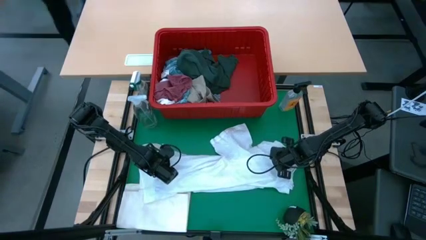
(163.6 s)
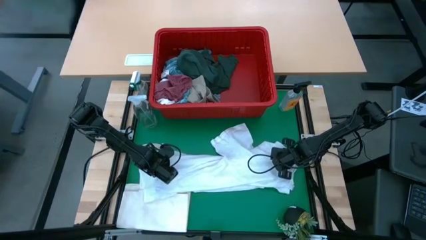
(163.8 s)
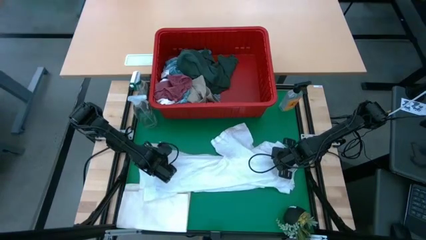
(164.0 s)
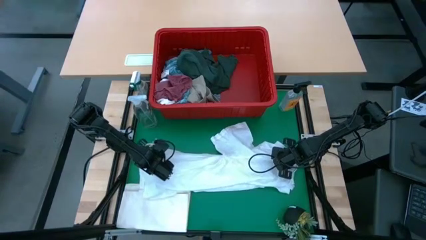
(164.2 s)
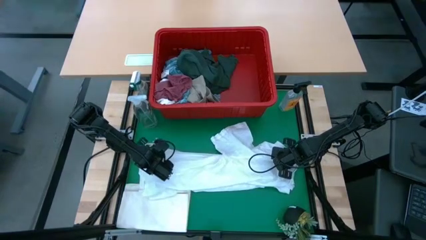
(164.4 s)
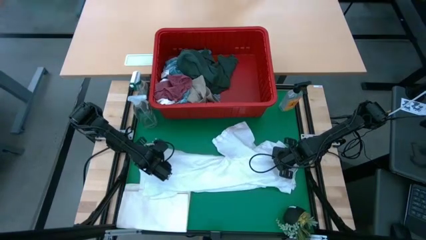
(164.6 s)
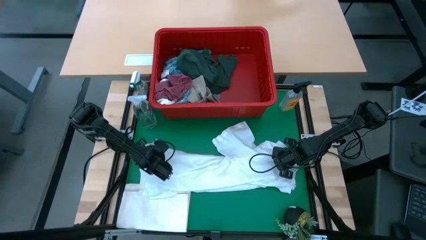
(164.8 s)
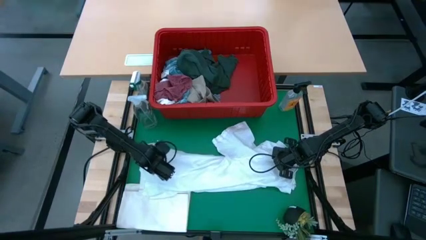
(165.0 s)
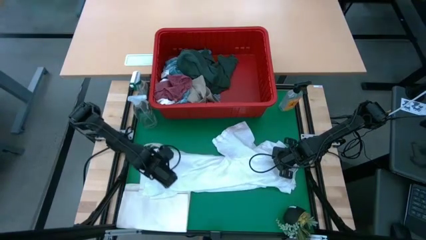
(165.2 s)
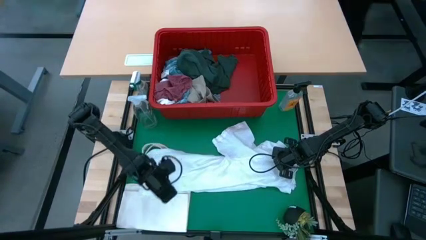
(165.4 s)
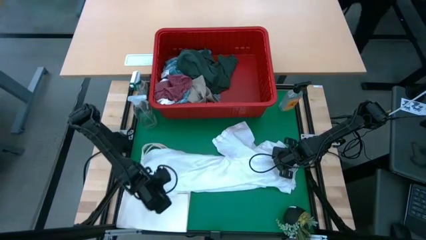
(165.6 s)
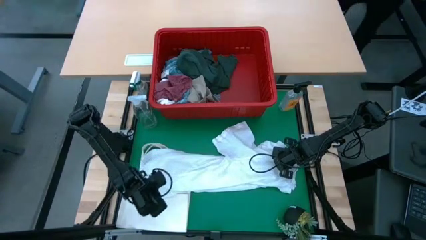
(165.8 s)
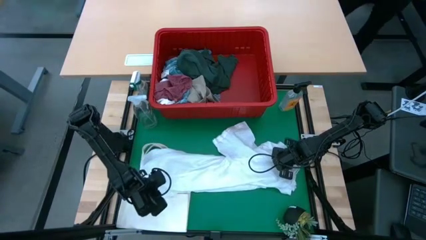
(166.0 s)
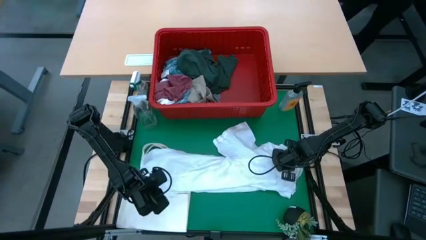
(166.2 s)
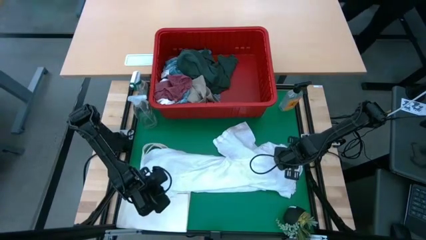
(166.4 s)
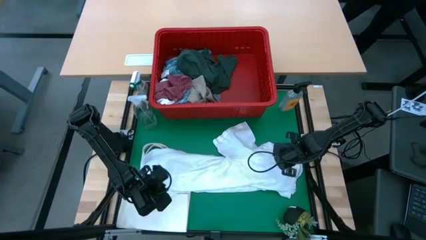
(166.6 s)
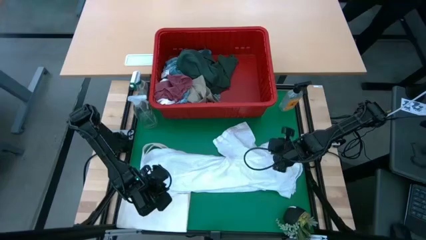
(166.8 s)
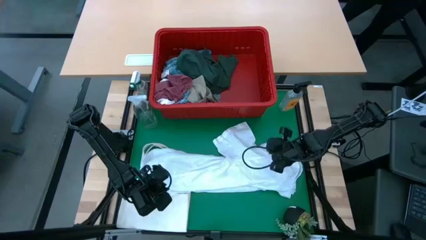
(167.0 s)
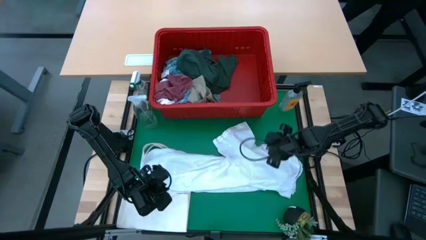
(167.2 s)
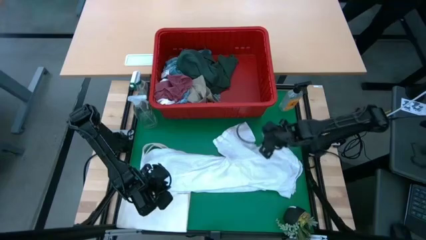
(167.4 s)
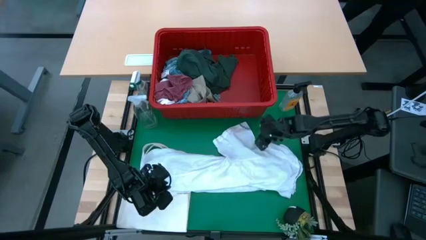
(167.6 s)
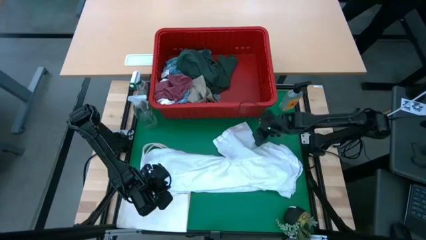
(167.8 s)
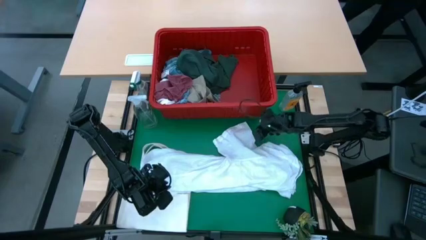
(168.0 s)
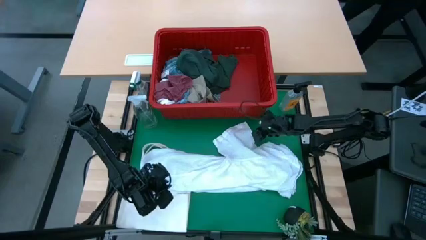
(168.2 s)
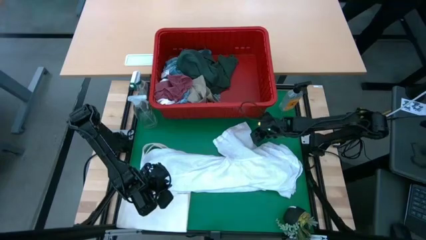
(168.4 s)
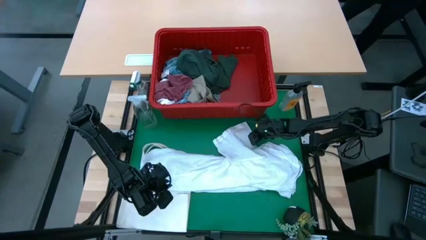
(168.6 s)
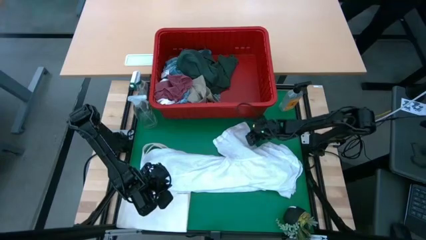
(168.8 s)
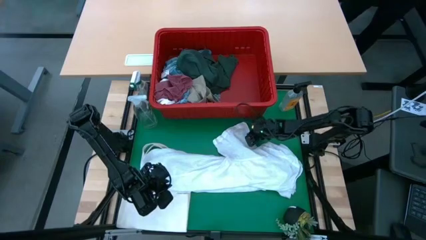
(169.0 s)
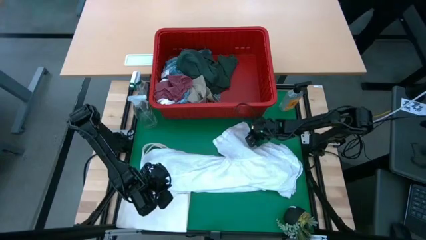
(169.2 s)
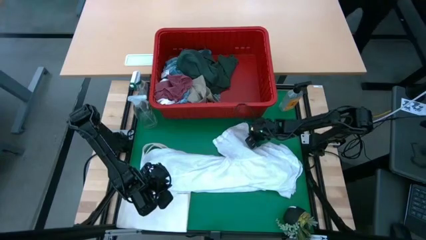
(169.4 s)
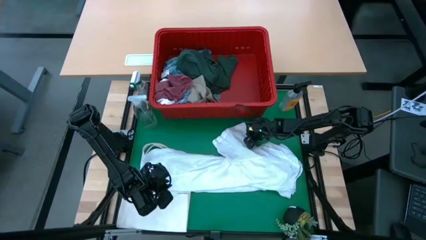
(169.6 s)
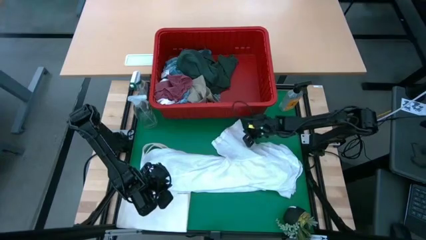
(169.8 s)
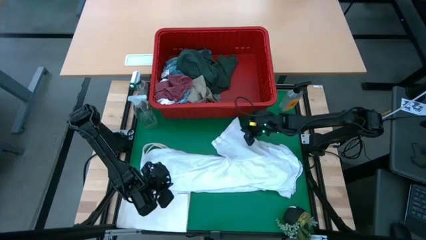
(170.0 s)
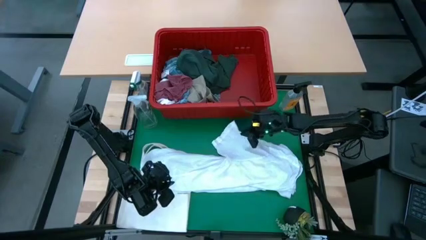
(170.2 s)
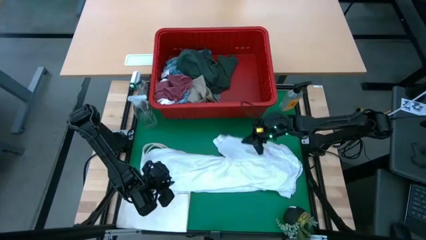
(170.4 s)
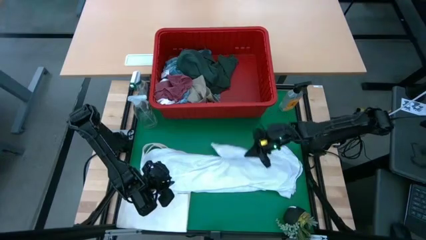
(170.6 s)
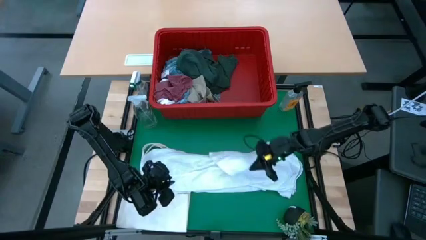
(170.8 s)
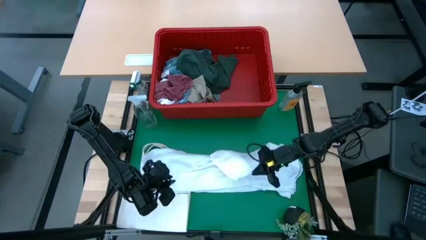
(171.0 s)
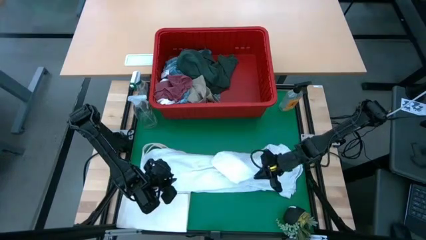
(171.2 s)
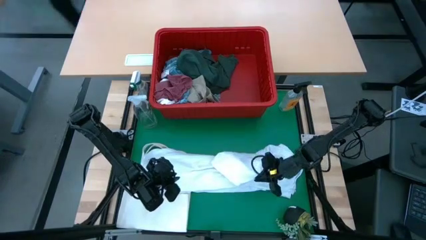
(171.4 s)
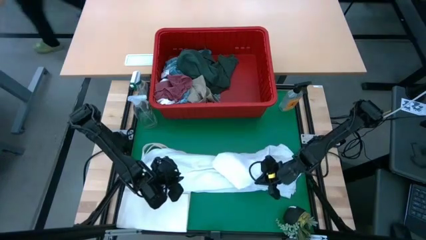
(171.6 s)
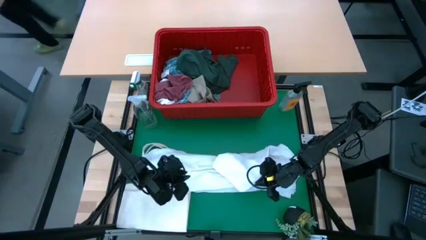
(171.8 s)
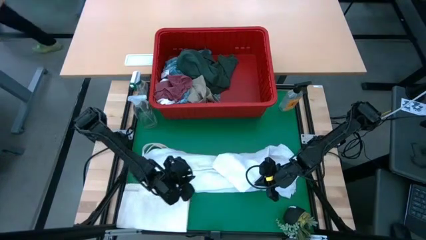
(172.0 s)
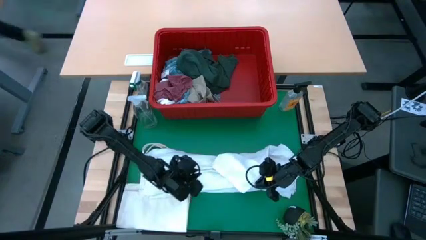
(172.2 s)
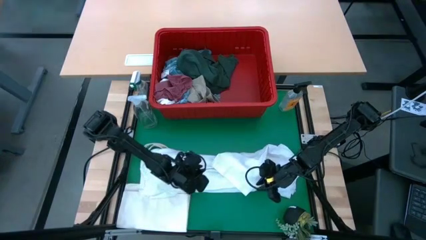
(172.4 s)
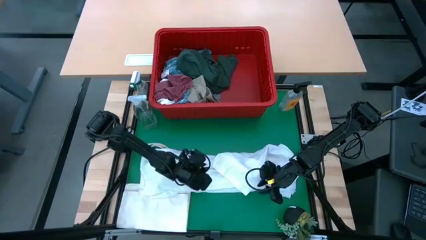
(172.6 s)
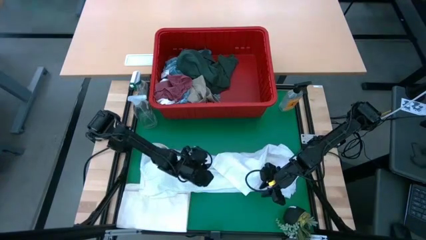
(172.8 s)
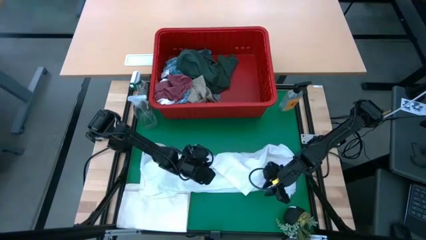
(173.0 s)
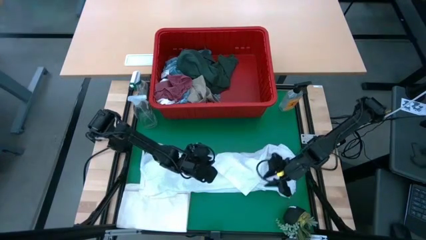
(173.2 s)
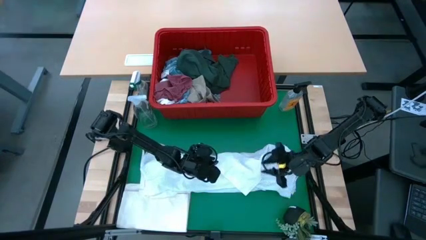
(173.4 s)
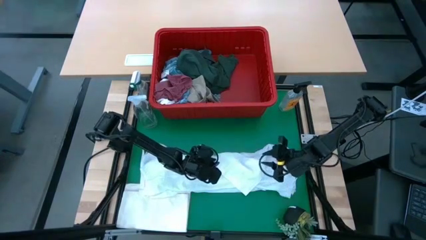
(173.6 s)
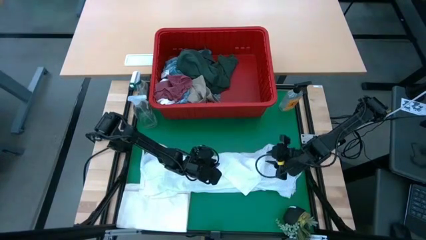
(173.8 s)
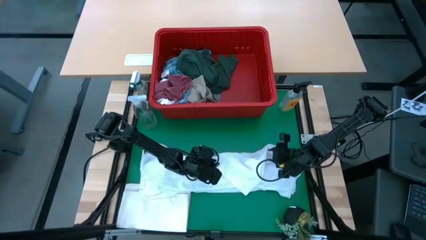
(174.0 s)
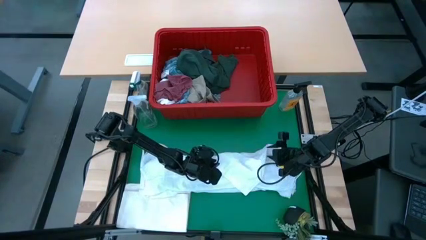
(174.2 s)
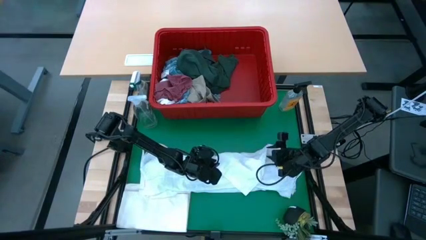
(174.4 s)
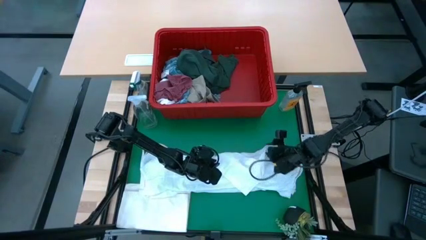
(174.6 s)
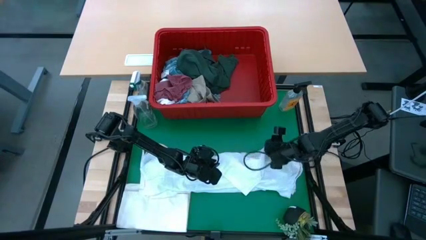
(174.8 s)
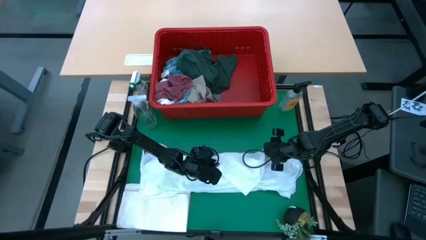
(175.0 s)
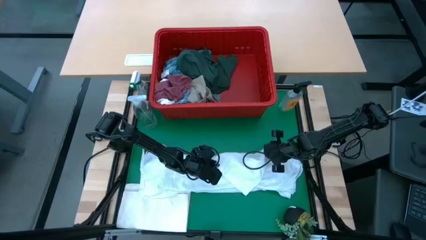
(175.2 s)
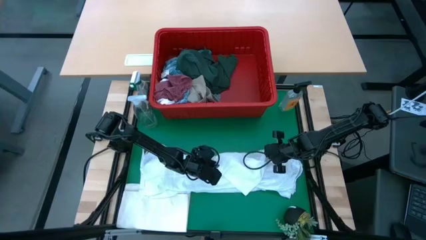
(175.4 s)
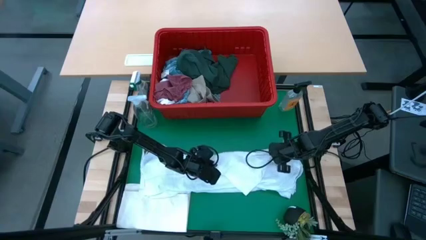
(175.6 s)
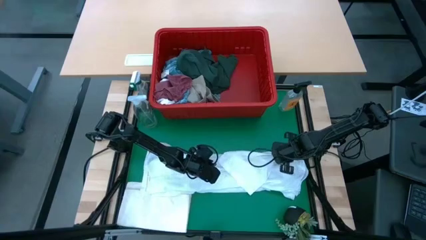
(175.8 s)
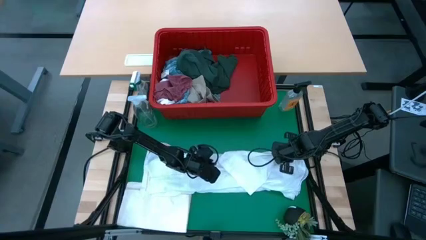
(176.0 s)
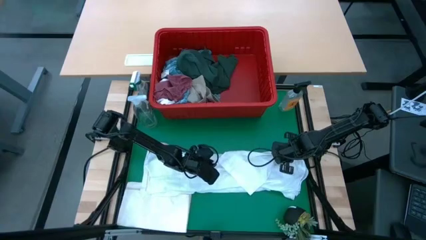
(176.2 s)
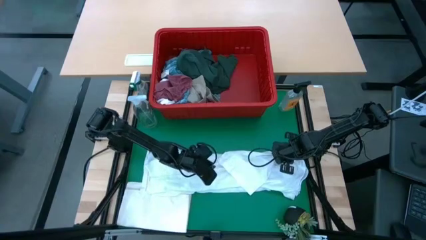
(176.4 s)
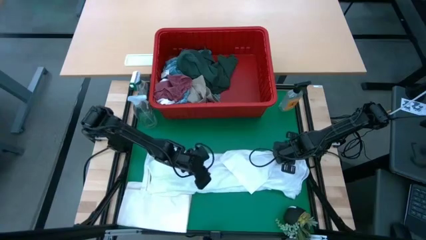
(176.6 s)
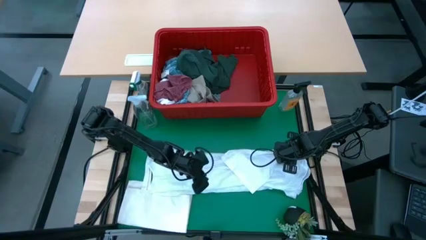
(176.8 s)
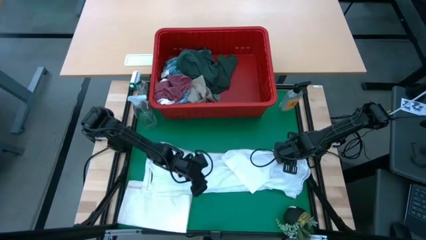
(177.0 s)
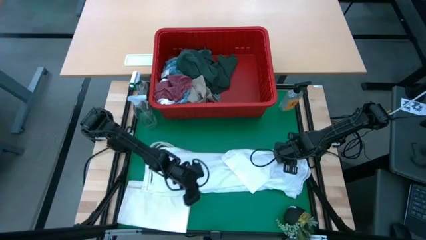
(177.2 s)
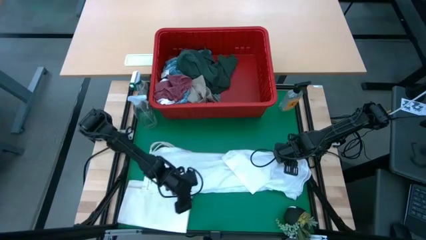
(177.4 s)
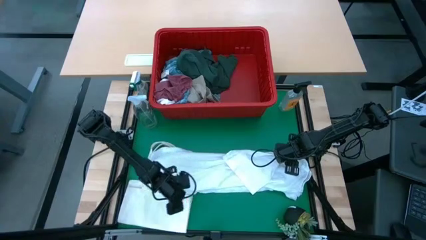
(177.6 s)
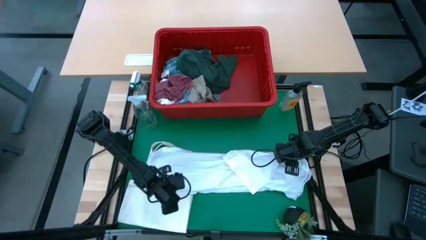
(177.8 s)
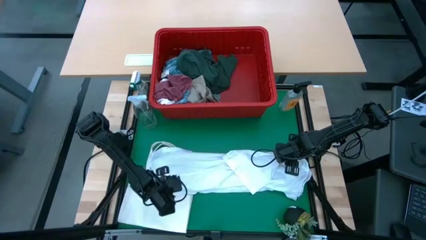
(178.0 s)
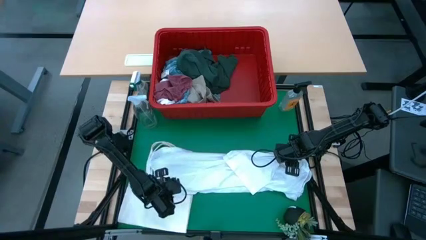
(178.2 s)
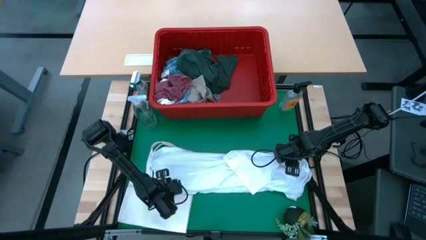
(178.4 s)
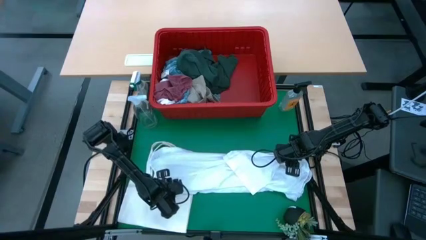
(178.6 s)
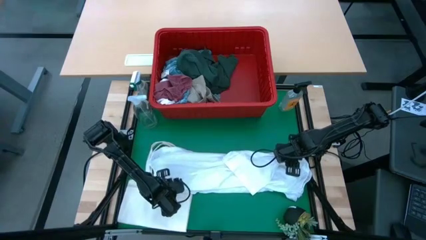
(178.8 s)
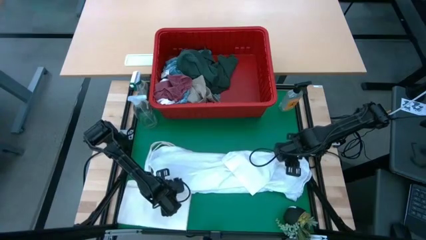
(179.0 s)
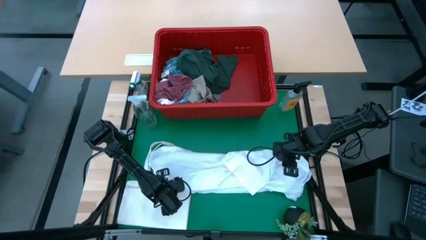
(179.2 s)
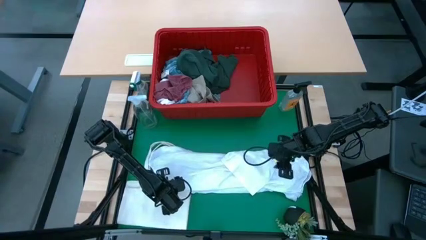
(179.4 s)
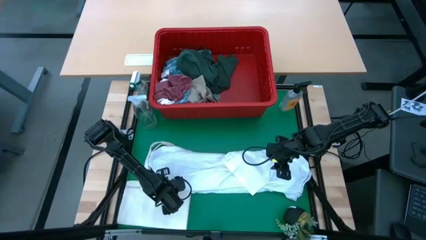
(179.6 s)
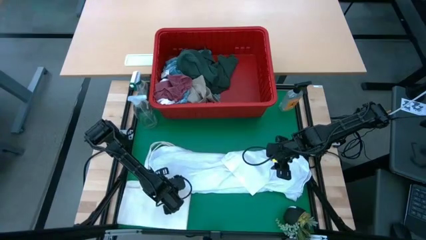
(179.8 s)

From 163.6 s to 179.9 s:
Task: Fold Laundry from Bin
Fold the white polo shirt
